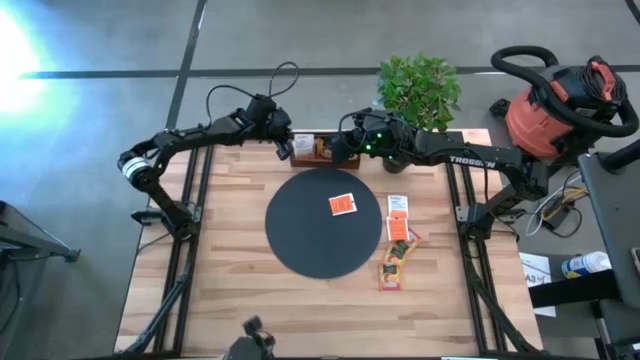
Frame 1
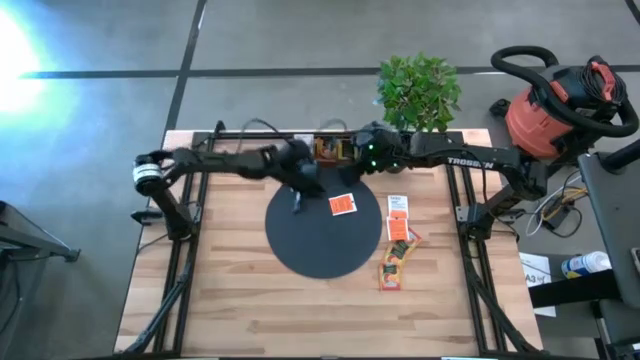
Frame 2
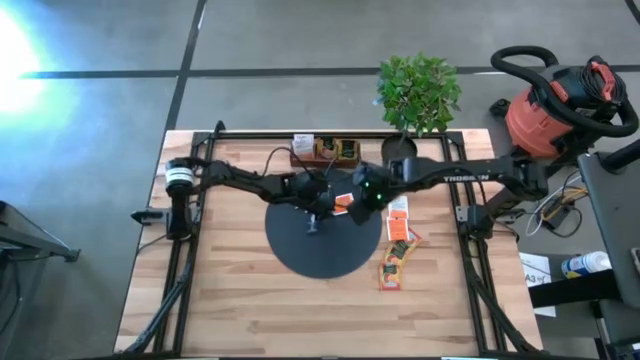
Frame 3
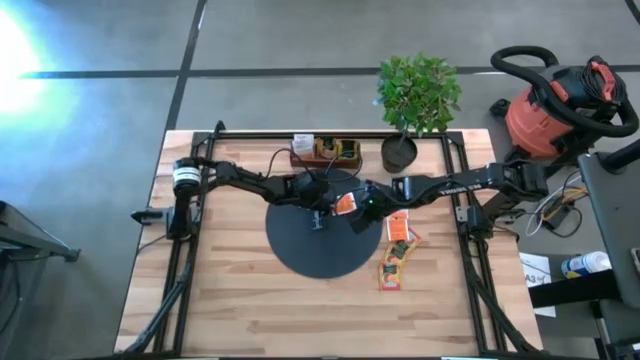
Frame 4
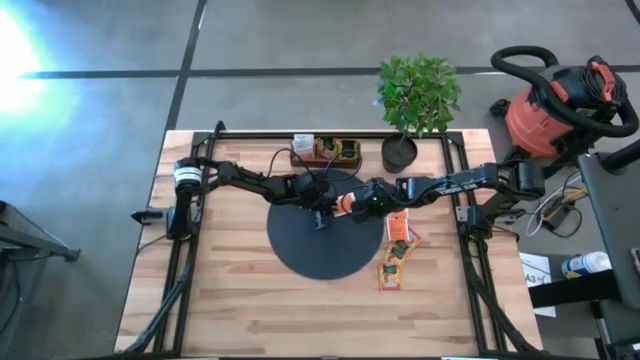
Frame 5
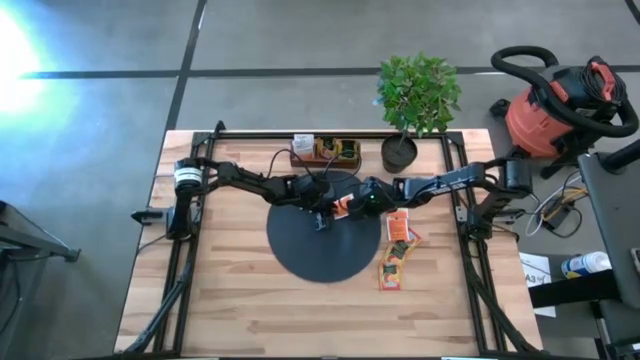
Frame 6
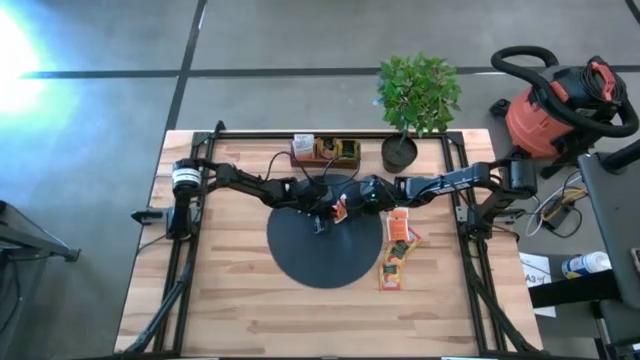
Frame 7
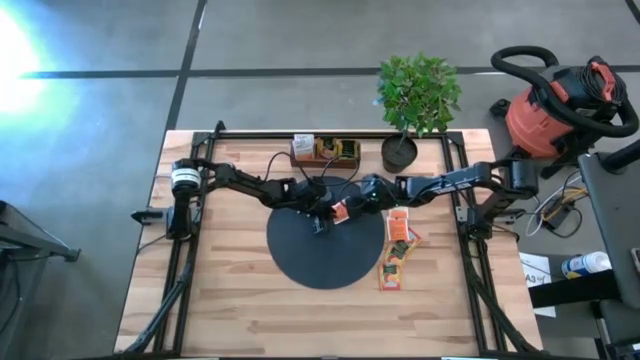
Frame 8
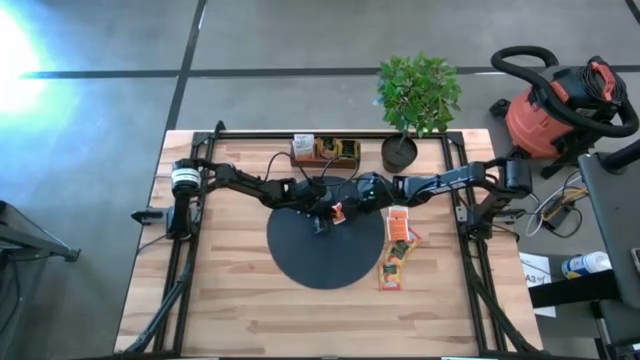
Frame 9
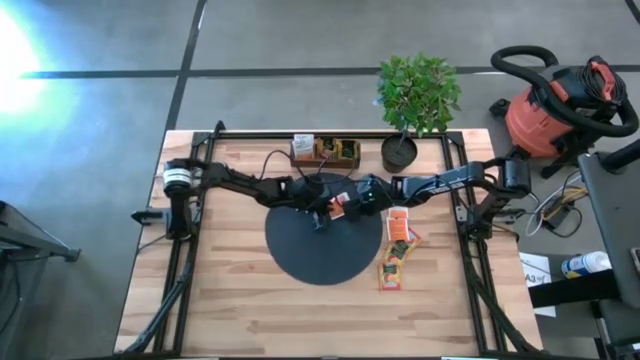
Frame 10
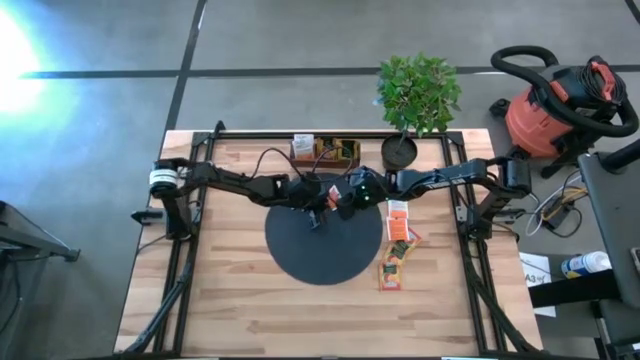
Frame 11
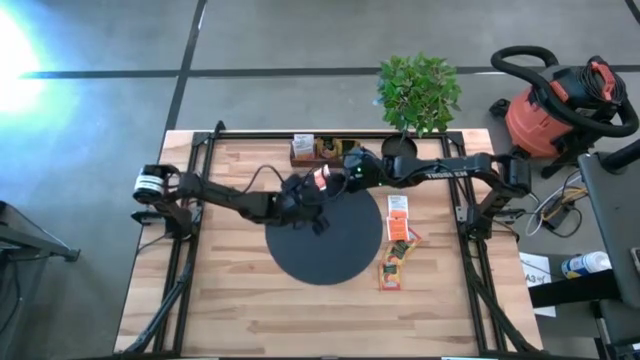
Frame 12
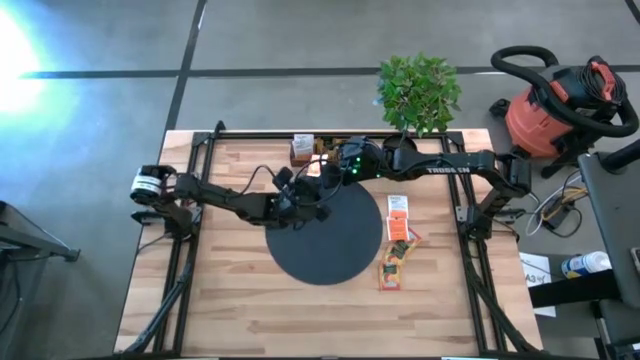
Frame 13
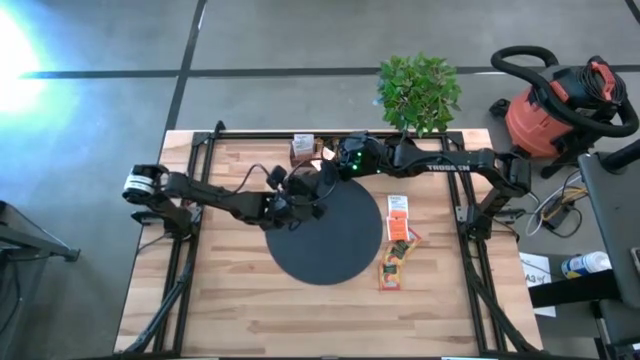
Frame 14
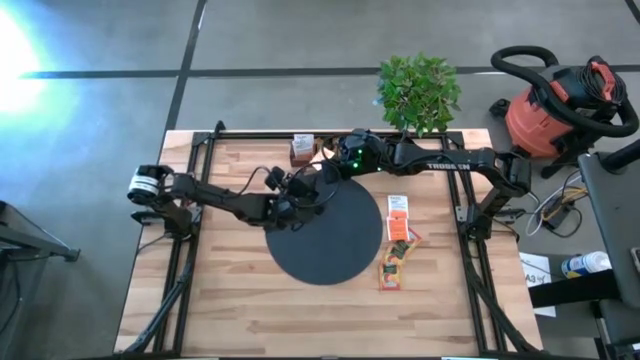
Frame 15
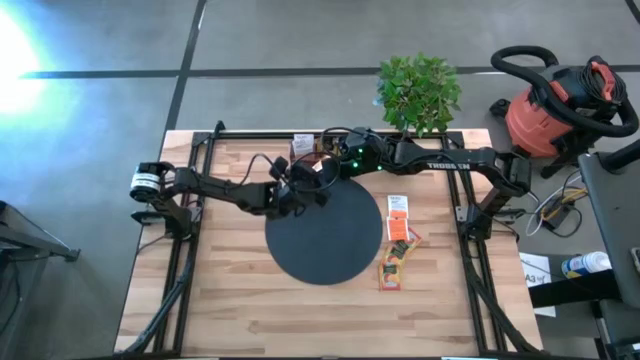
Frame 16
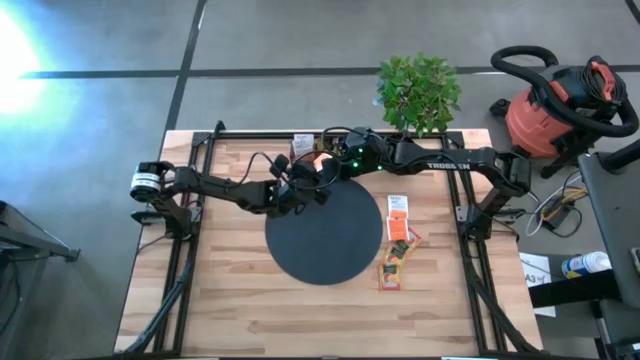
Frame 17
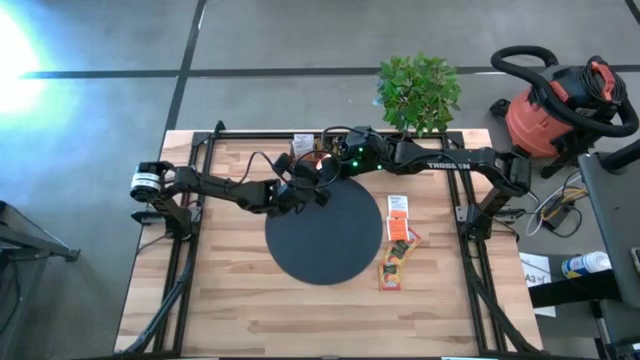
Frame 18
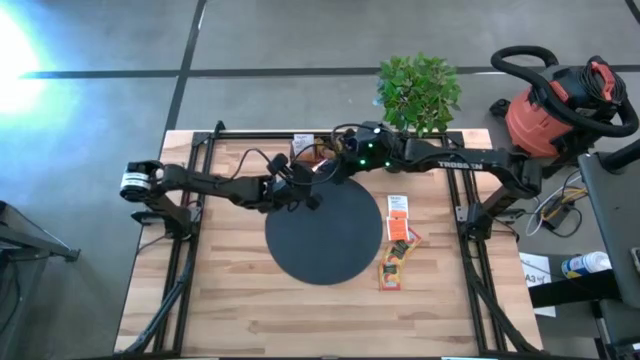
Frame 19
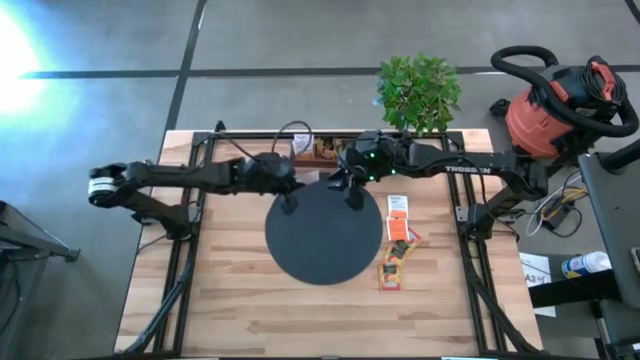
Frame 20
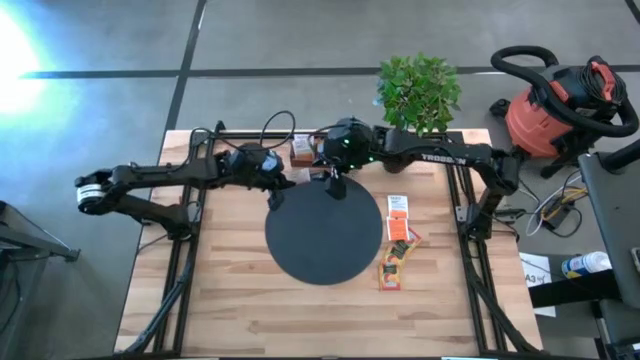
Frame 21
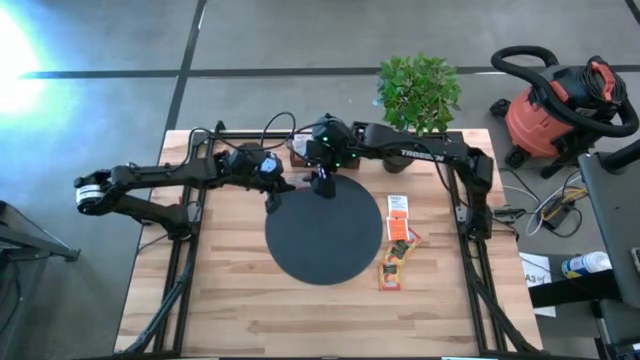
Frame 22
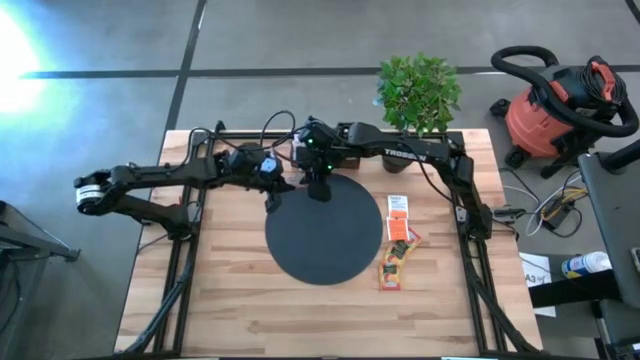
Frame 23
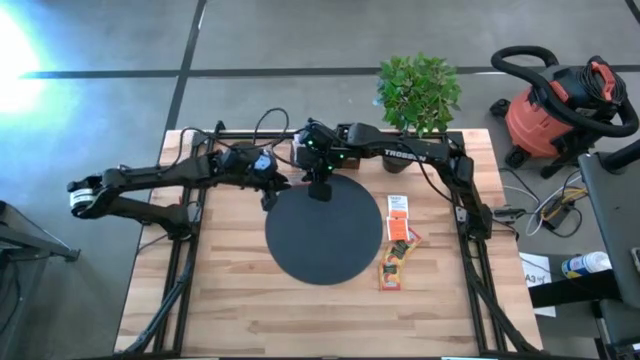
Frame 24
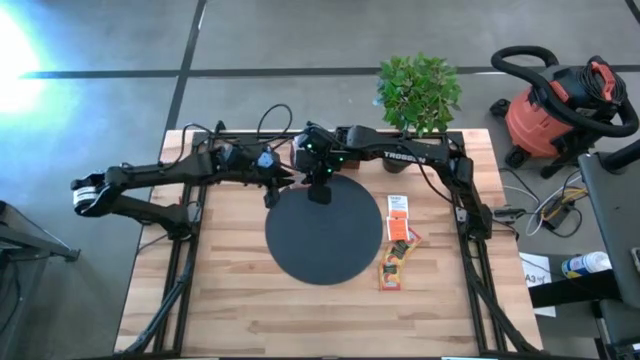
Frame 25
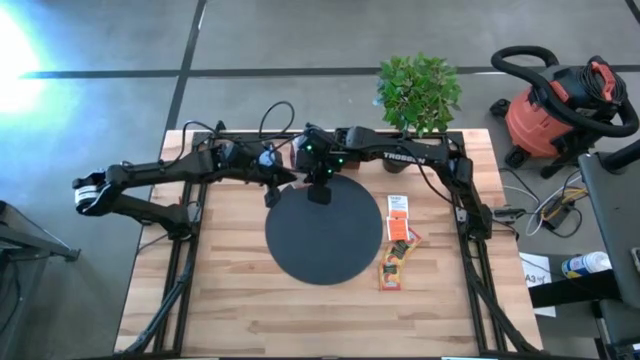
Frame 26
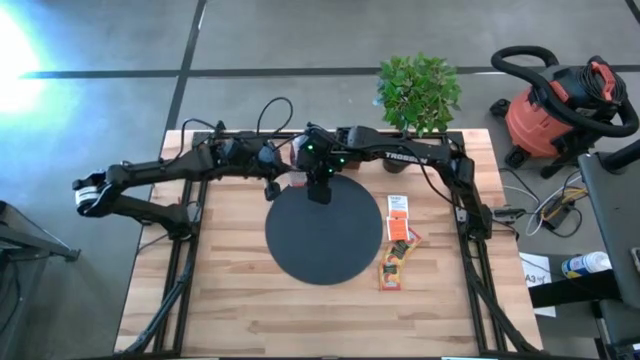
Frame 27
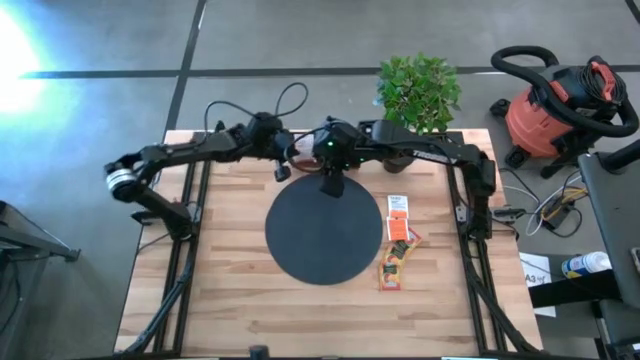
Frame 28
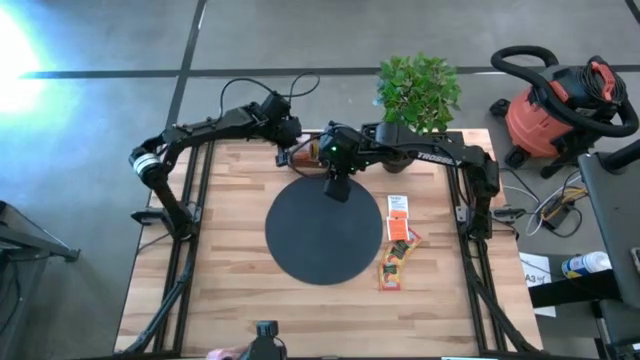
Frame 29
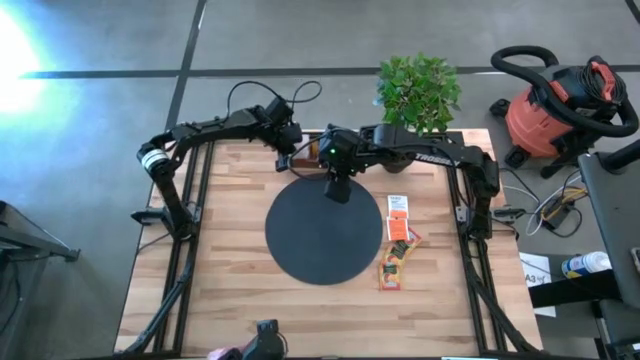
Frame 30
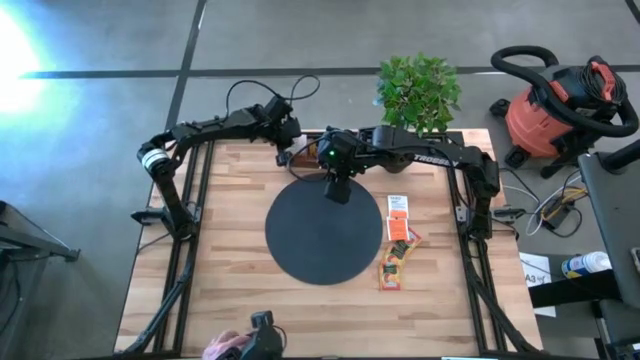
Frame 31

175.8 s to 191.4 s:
Task: Pick & Place Tea
Put the white tea bag into the left section of the brown wooden organizer

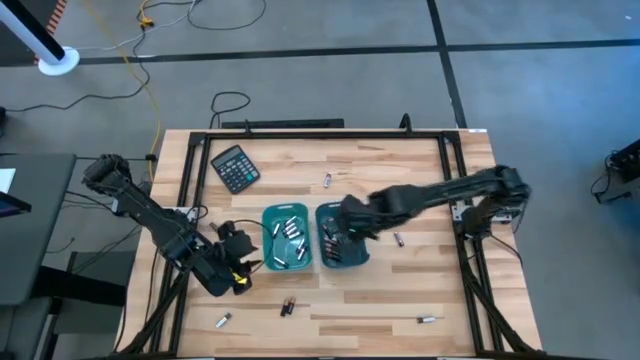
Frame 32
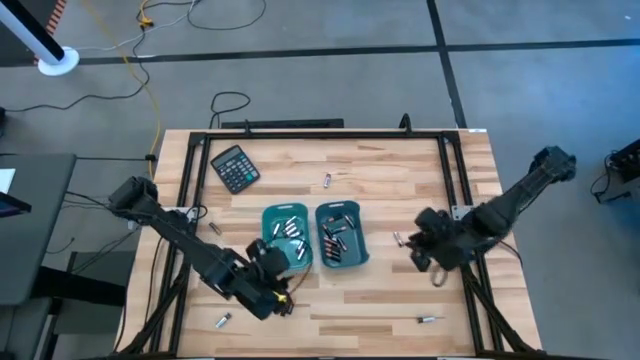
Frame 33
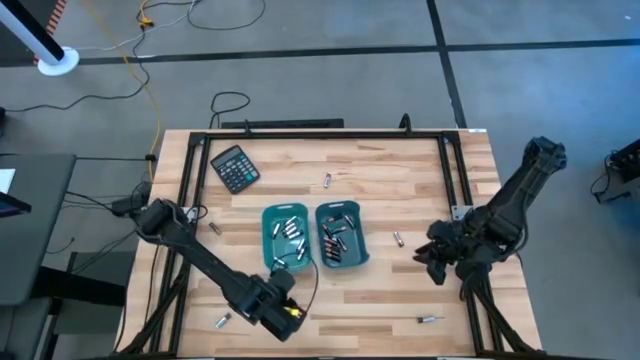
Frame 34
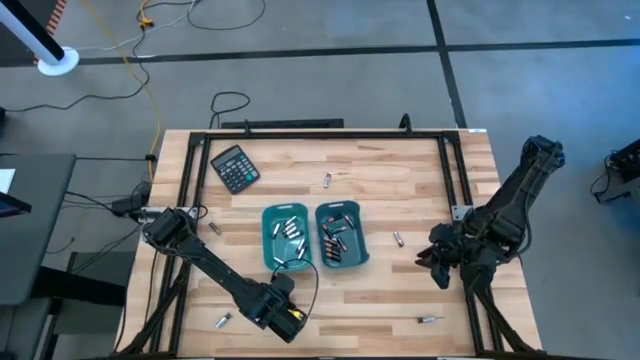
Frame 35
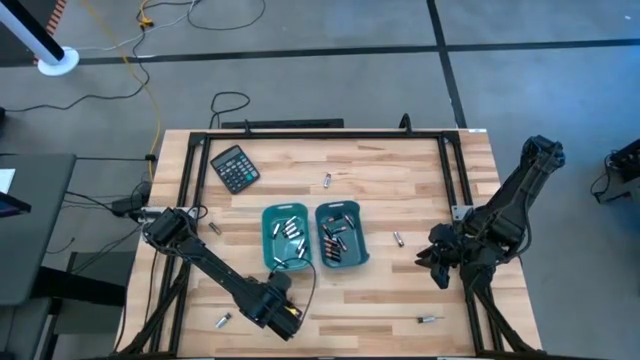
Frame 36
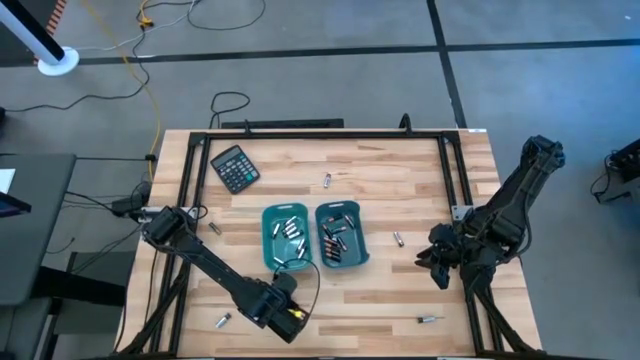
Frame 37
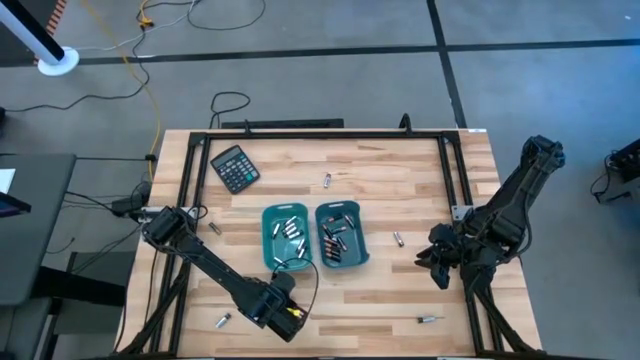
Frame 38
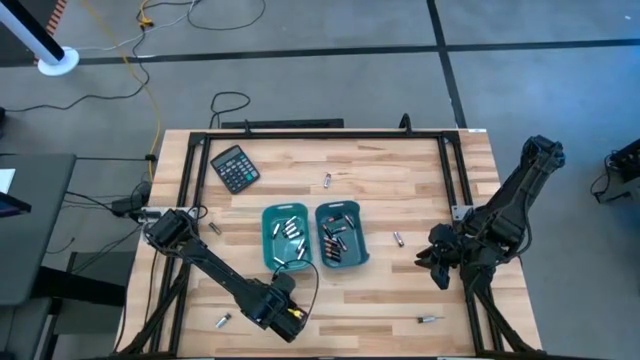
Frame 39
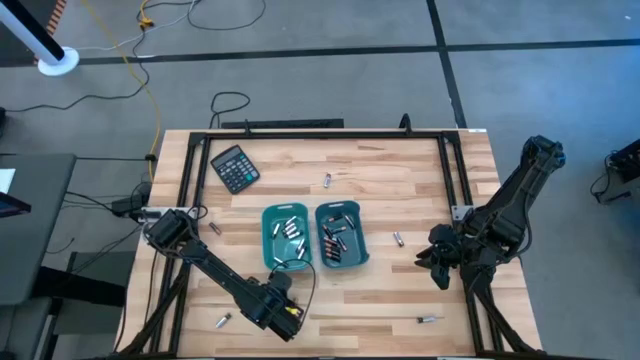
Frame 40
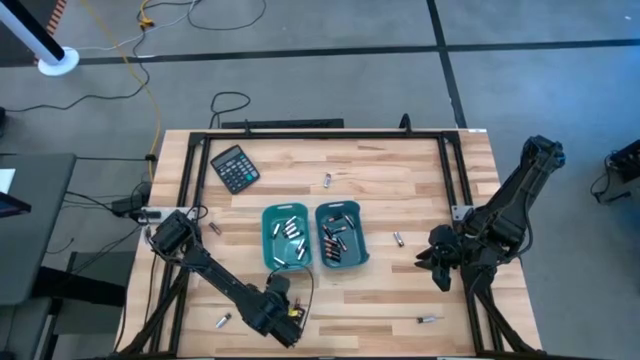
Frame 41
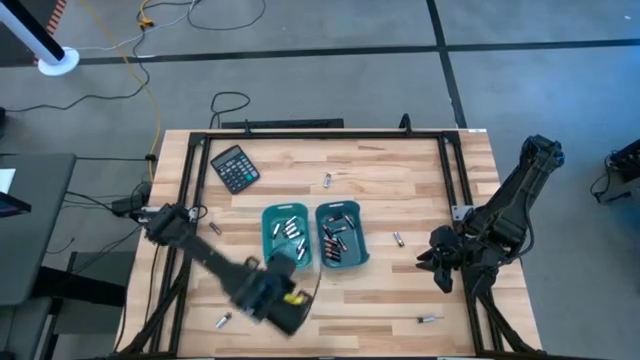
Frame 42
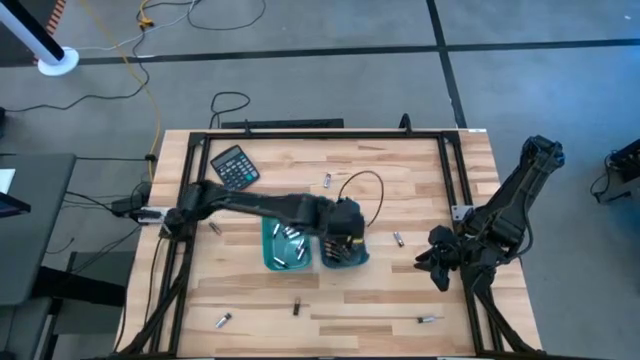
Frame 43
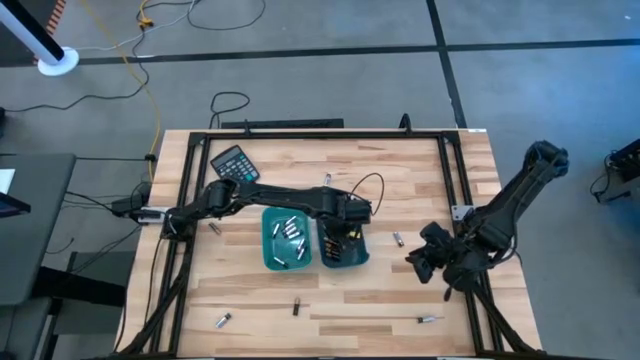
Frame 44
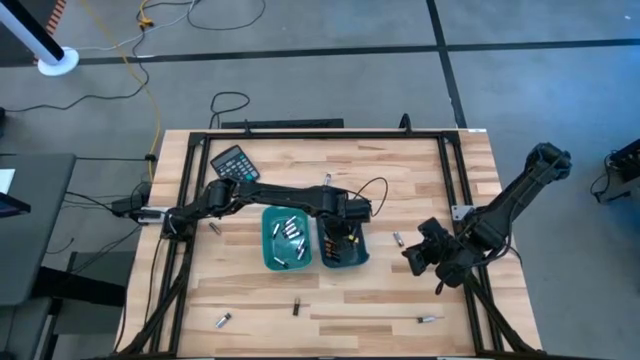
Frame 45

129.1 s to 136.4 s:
Task: Sort batteries
Put the black battery into the blue bin
